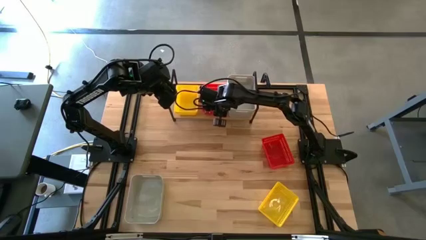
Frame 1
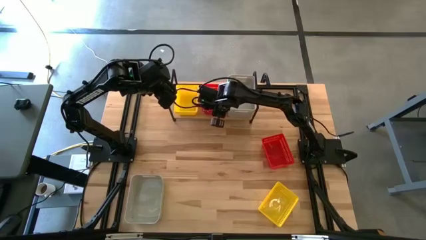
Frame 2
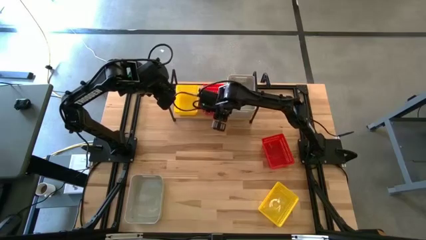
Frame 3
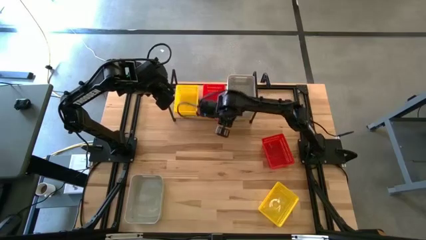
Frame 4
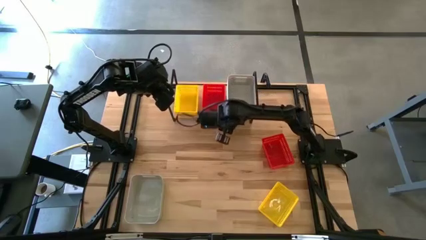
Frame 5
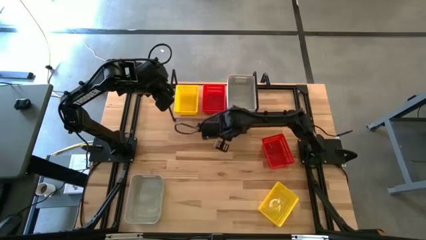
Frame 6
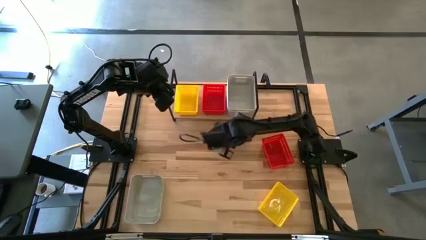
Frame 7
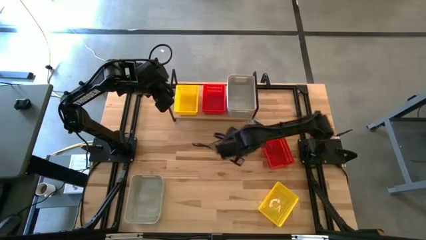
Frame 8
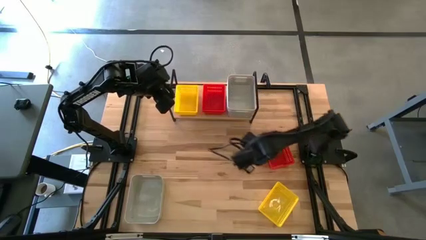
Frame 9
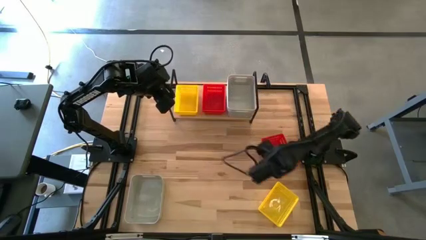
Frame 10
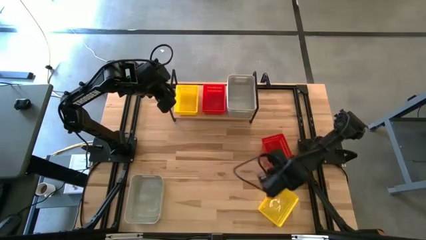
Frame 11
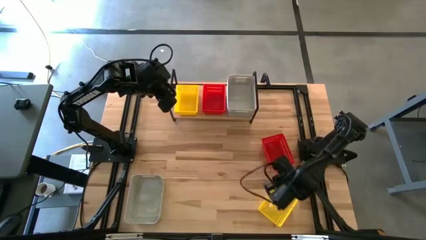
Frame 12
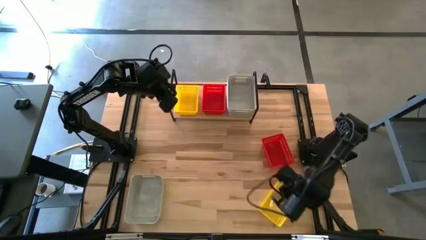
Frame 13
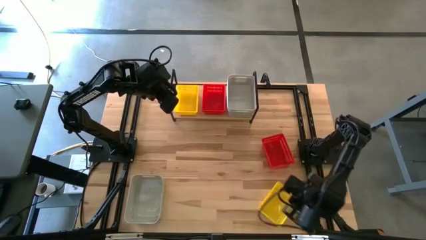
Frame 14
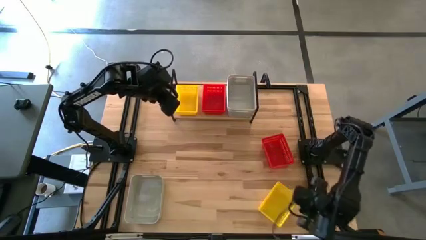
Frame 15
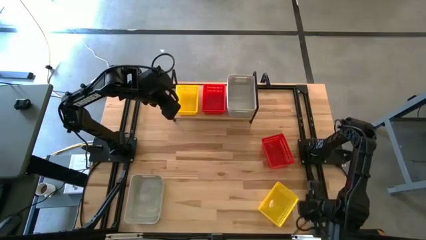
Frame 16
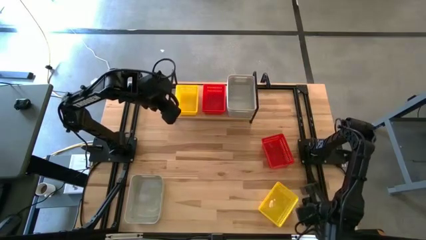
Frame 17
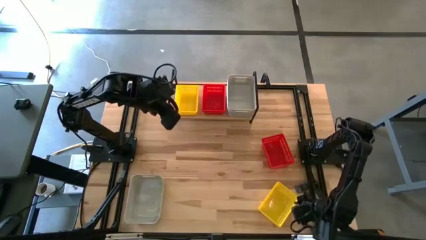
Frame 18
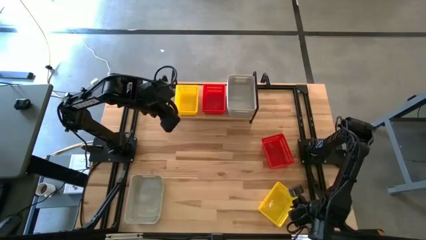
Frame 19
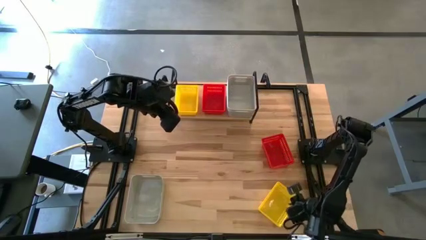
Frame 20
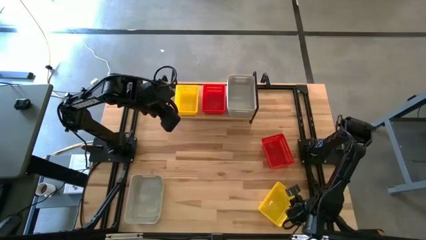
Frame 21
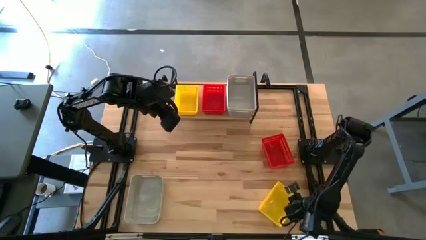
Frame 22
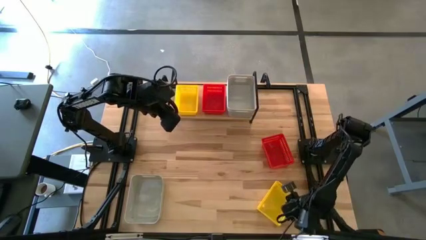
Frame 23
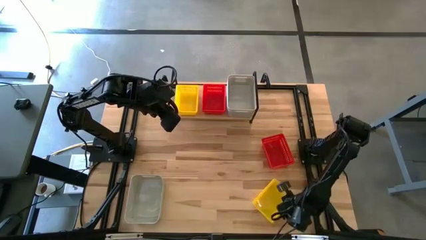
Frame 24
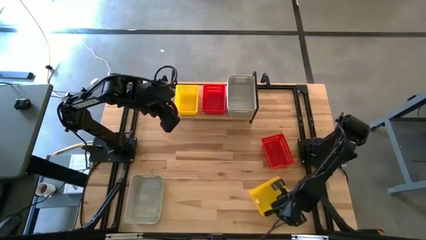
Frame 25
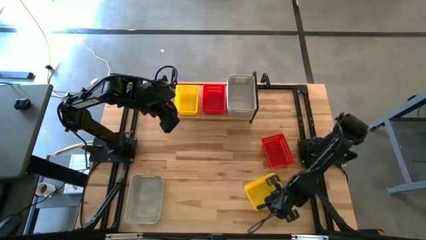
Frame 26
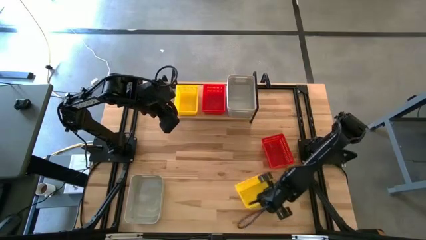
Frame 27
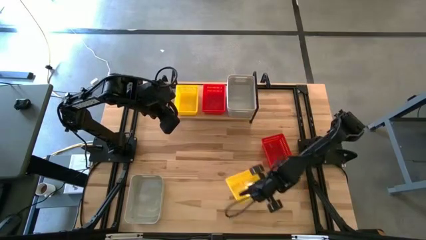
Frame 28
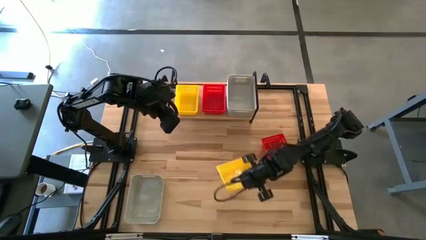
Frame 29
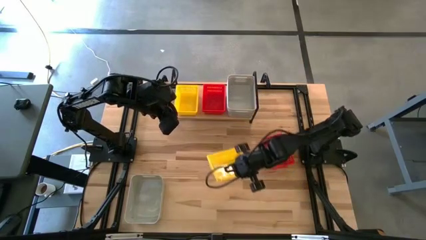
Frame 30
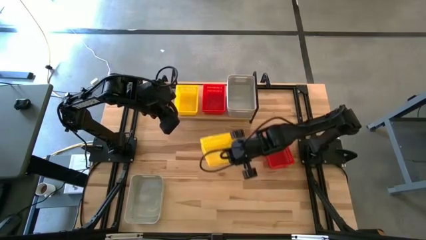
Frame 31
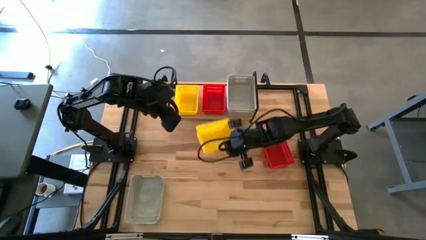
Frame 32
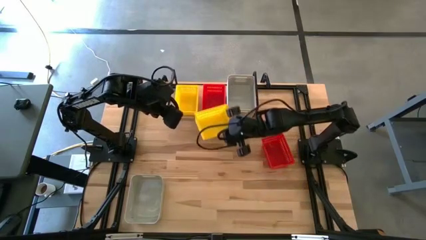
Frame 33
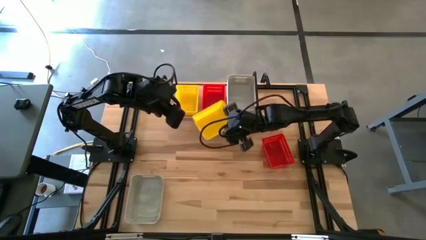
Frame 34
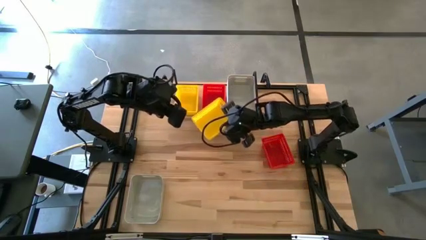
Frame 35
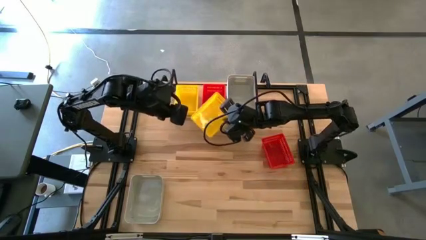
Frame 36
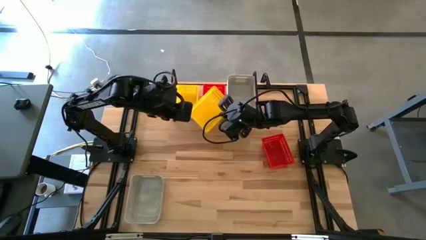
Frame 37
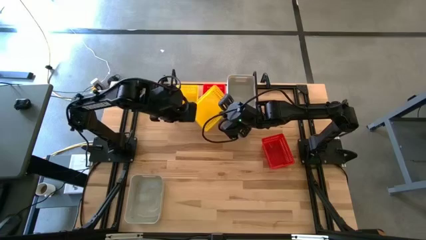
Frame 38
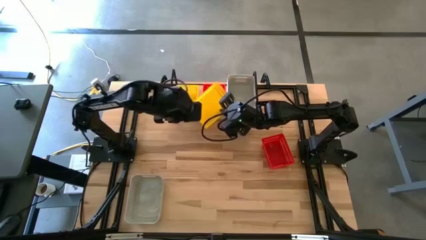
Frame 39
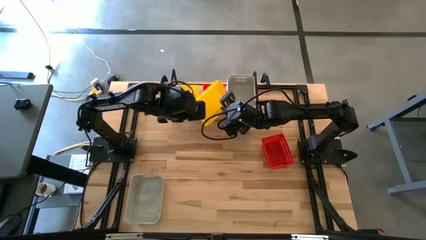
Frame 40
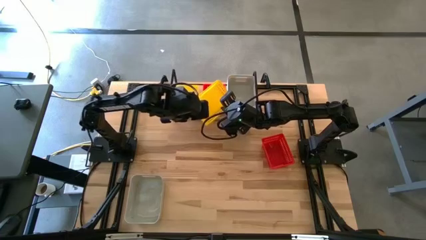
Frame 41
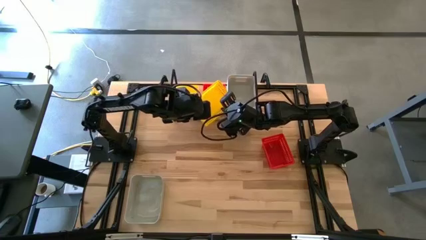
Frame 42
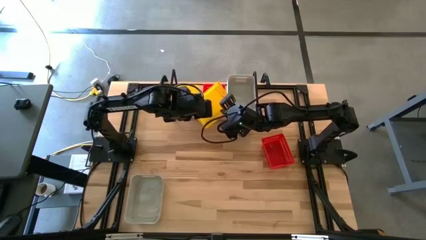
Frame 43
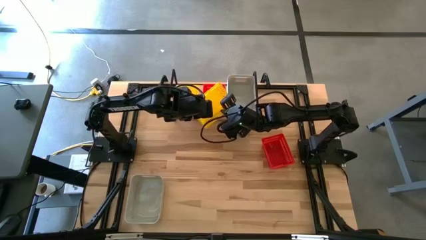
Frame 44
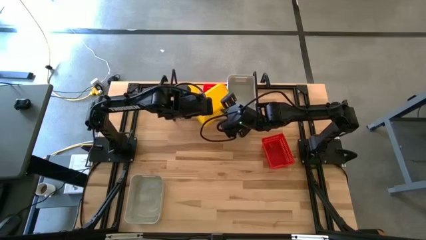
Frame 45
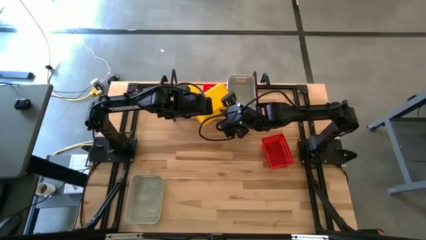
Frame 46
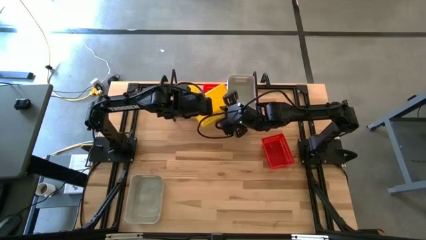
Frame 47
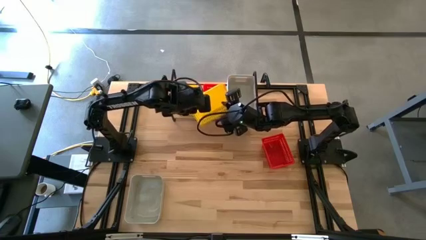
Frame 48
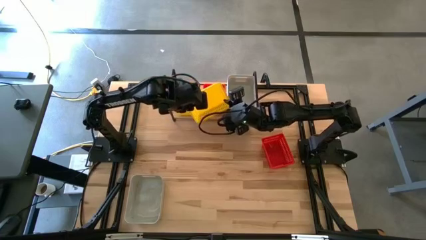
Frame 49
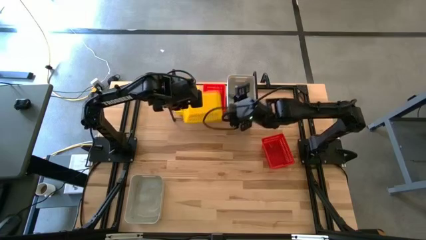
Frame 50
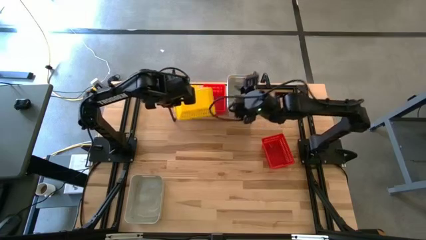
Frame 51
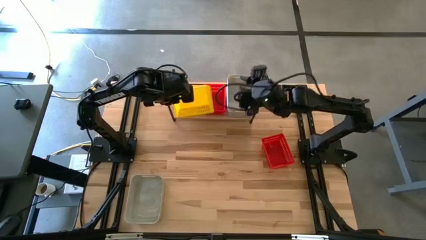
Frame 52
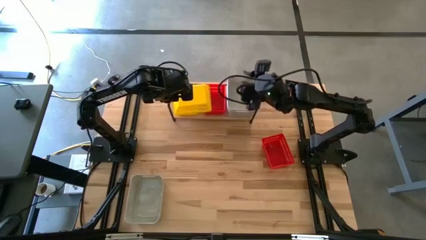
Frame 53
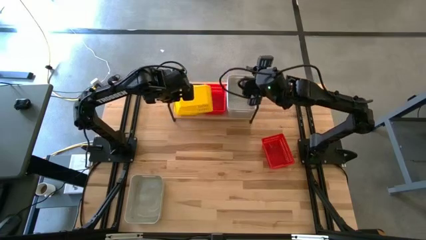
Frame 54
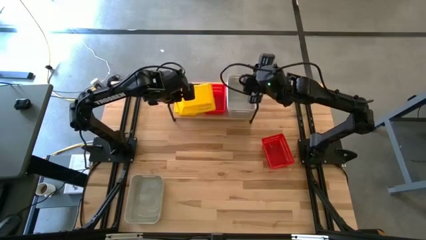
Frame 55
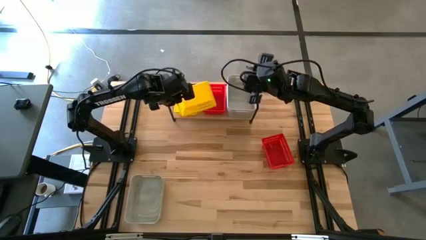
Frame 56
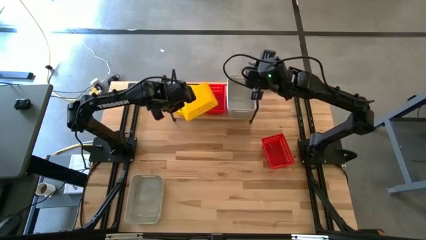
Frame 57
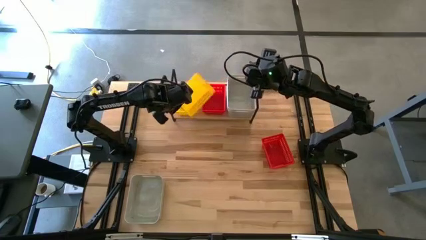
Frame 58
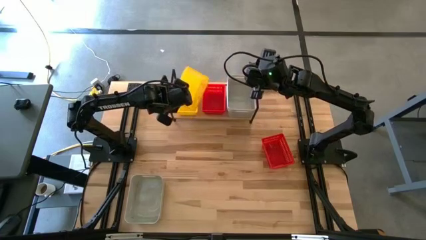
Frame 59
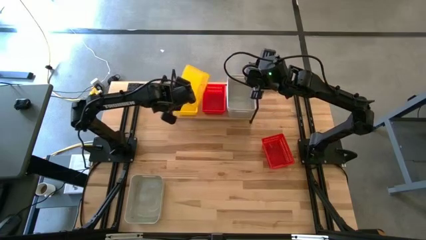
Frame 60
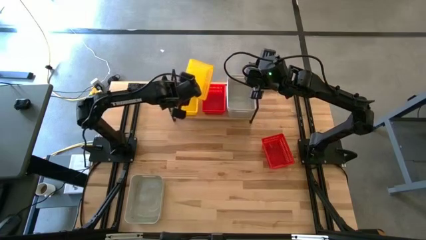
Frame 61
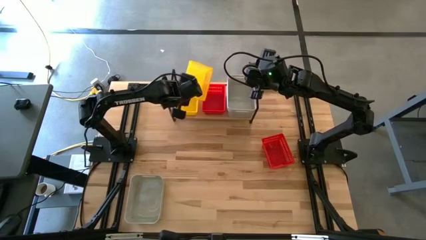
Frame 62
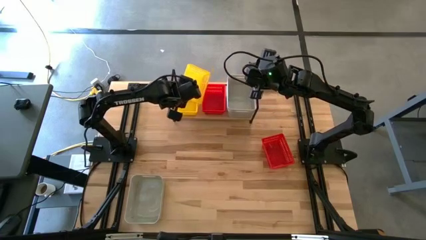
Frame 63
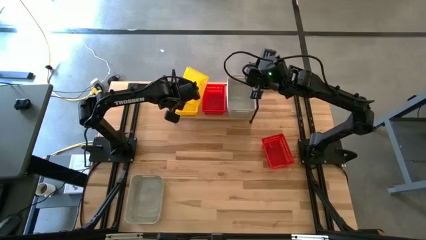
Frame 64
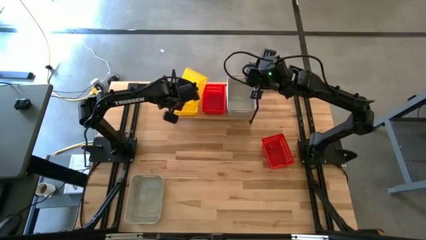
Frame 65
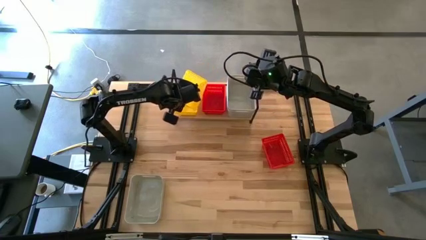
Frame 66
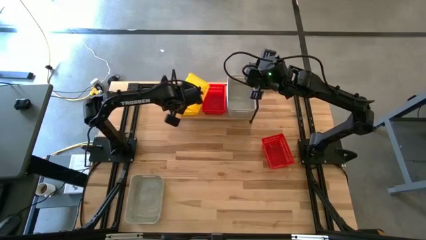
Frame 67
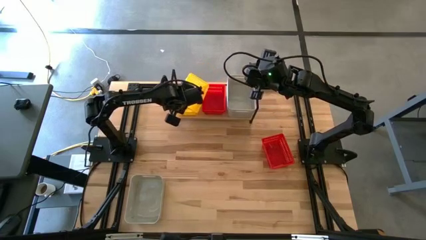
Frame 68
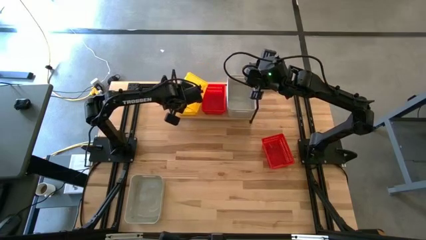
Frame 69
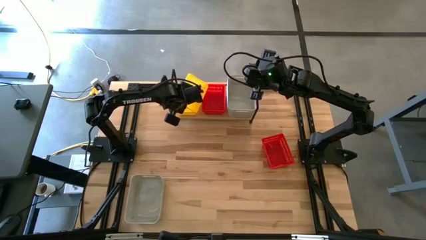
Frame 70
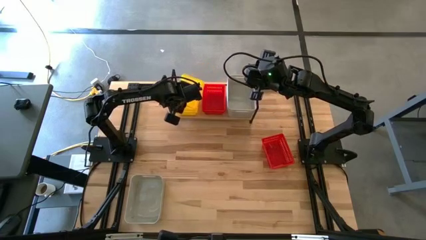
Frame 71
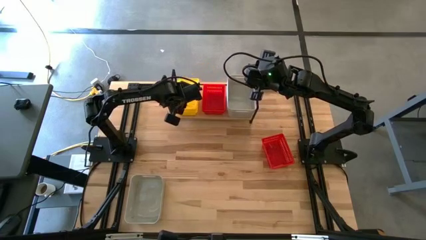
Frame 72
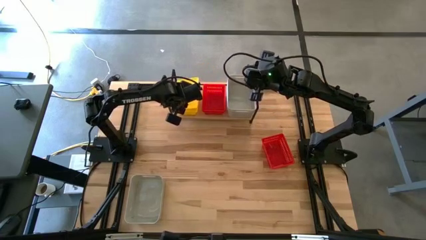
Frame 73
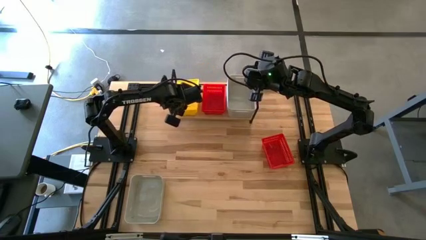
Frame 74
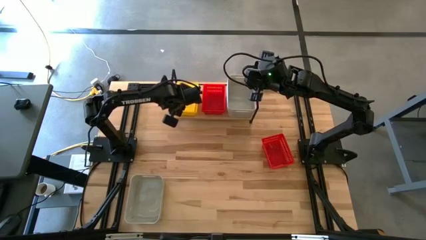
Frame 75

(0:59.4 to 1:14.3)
Task: Stack baskets on shelf by color
Stack the yellow basket on top of the yellow baskets on the shelf

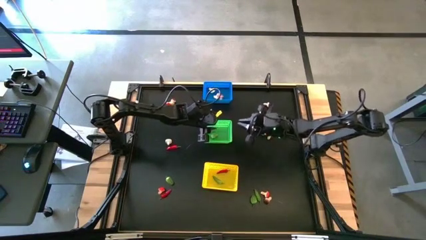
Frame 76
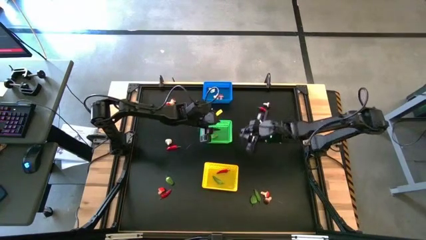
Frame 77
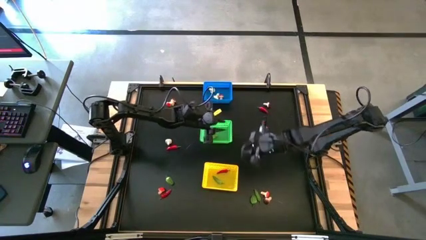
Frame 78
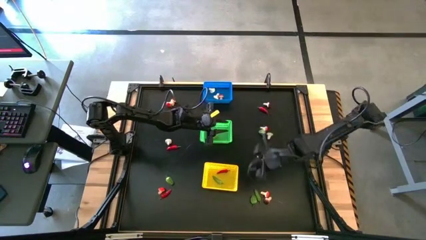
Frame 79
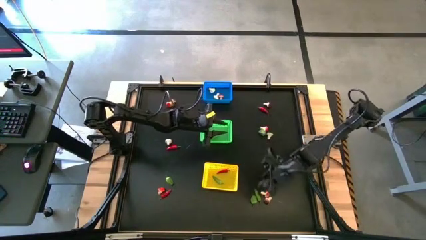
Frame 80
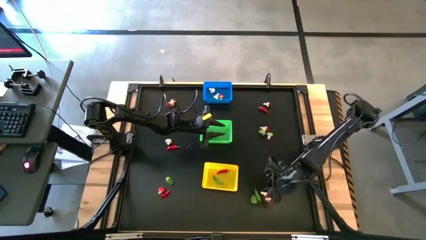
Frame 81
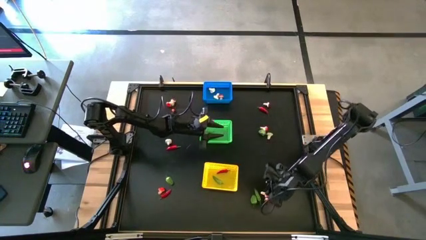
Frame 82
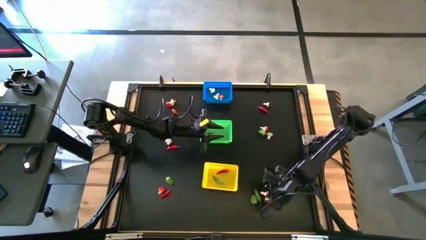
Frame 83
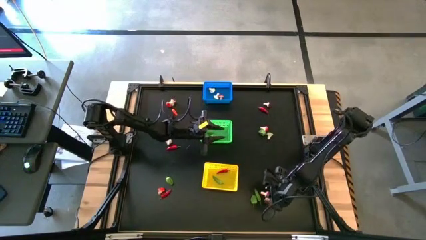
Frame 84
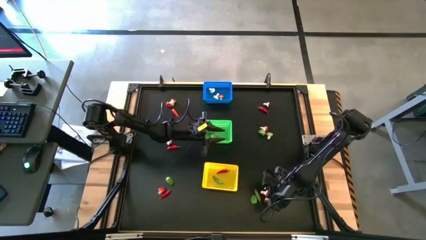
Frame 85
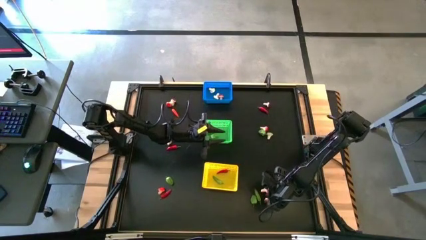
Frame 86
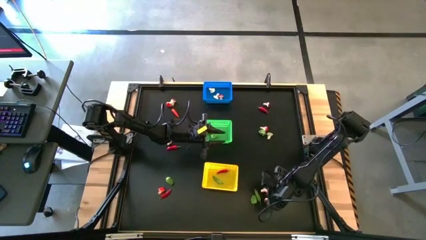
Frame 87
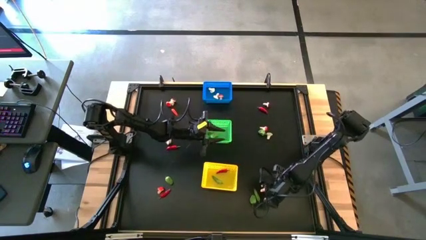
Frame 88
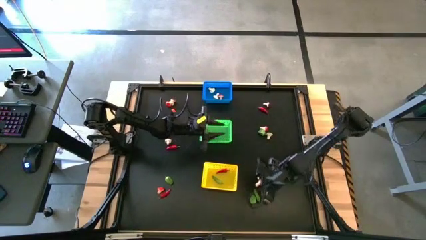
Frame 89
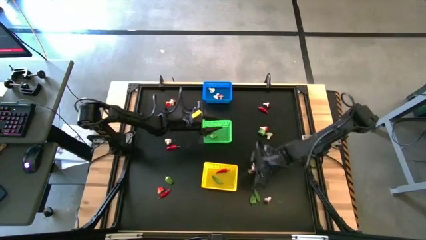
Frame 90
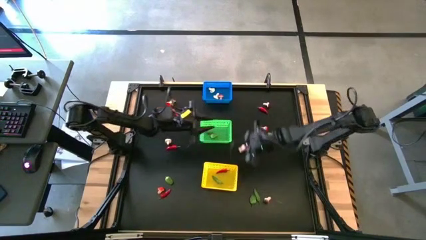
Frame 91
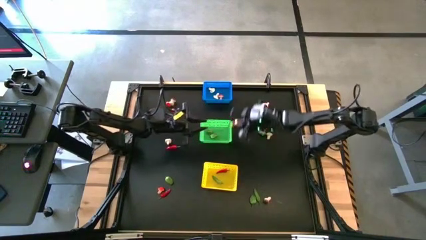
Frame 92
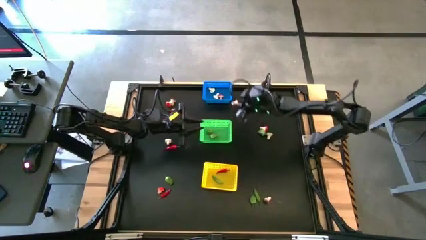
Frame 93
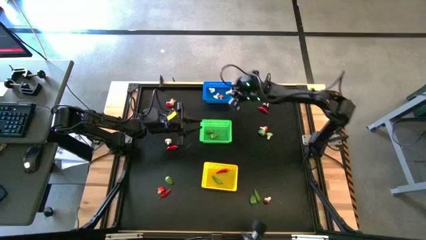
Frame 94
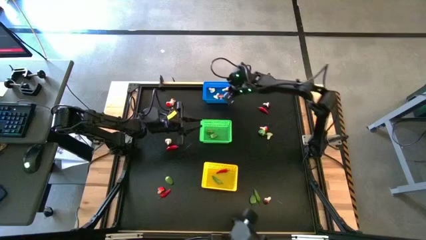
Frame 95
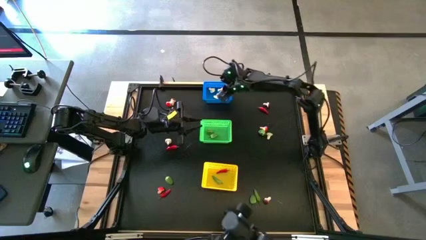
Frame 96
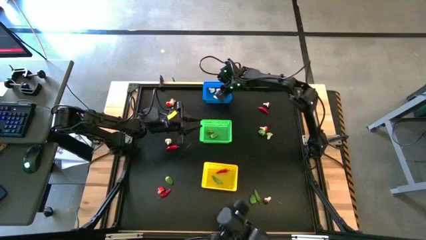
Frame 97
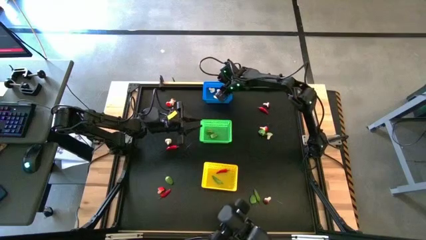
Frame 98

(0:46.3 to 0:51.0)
Task: Sort produce into baskets
Put the red mushroom into the blue bin
